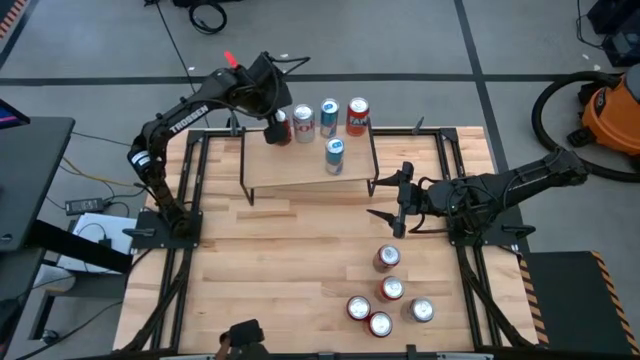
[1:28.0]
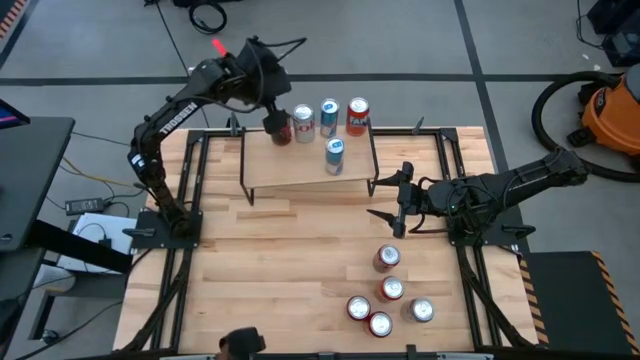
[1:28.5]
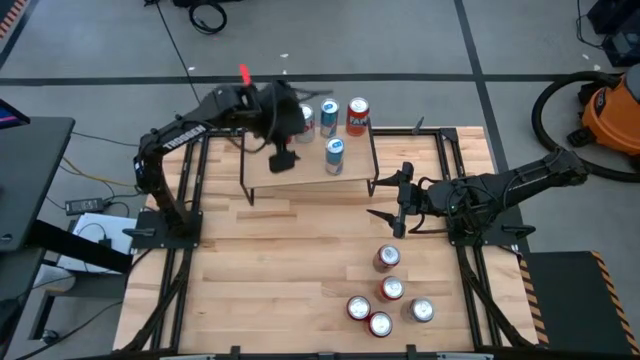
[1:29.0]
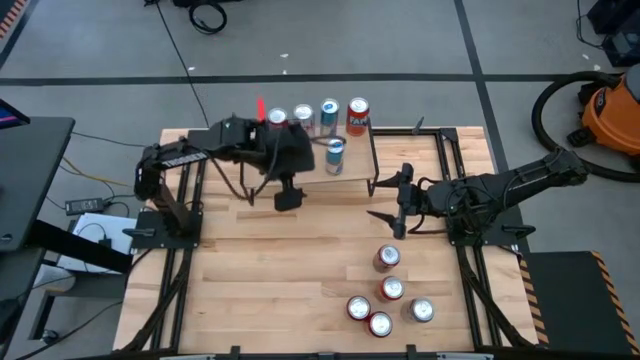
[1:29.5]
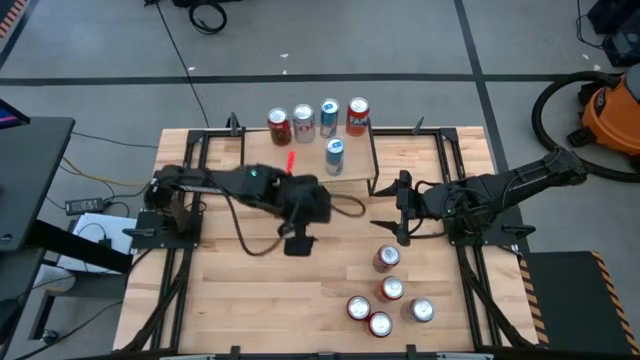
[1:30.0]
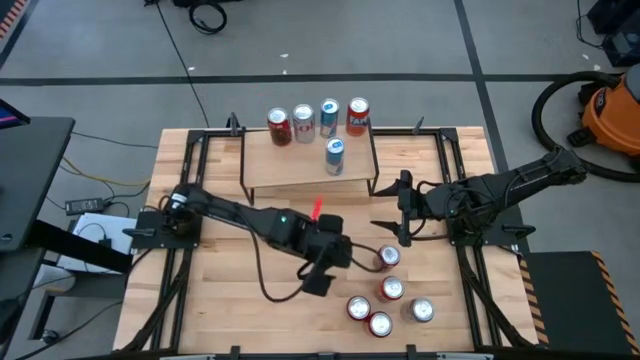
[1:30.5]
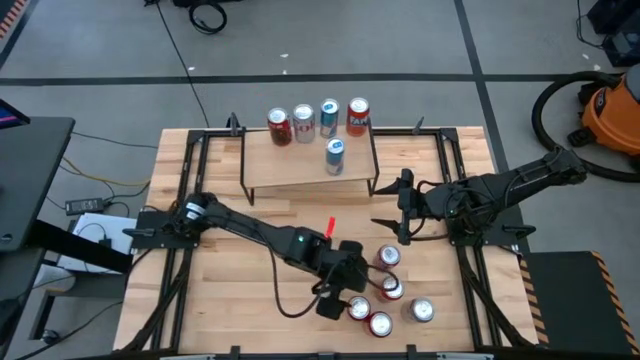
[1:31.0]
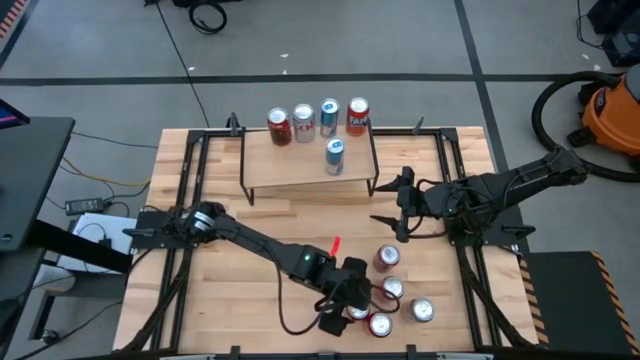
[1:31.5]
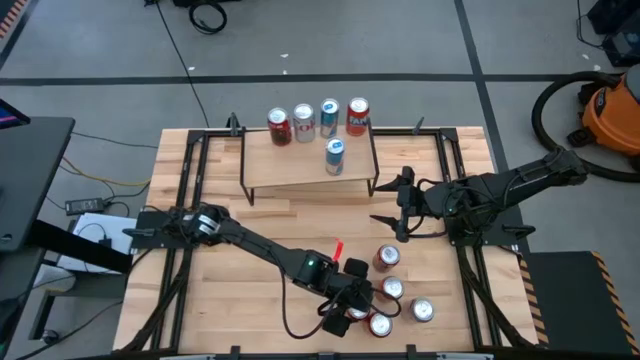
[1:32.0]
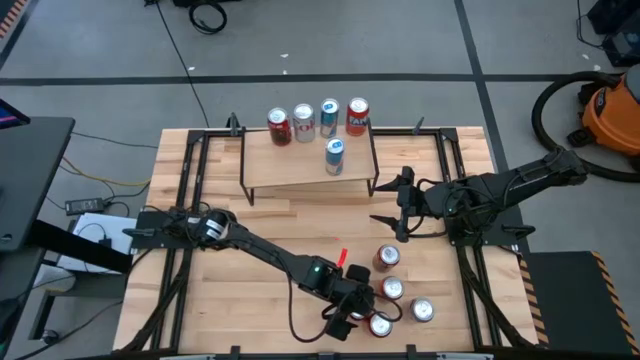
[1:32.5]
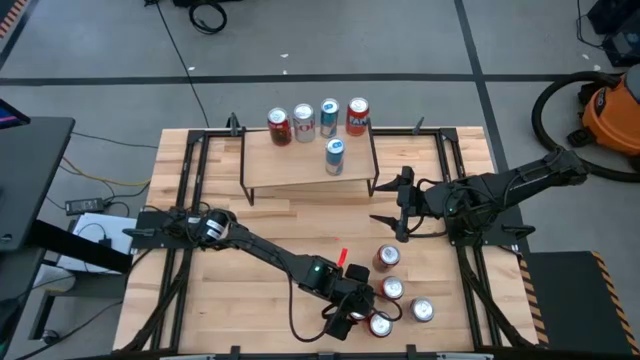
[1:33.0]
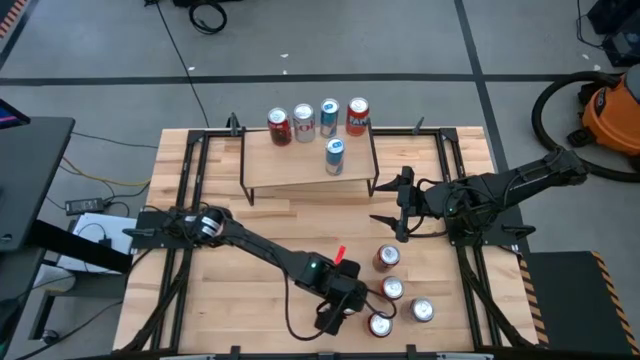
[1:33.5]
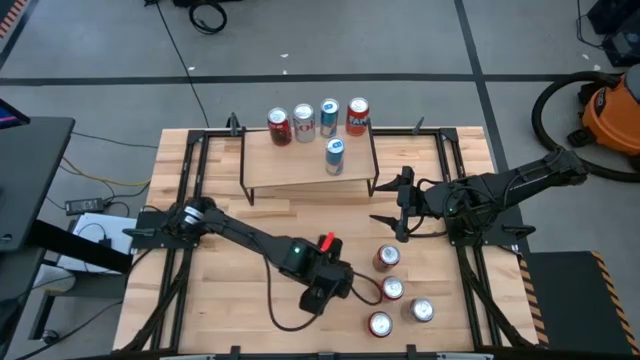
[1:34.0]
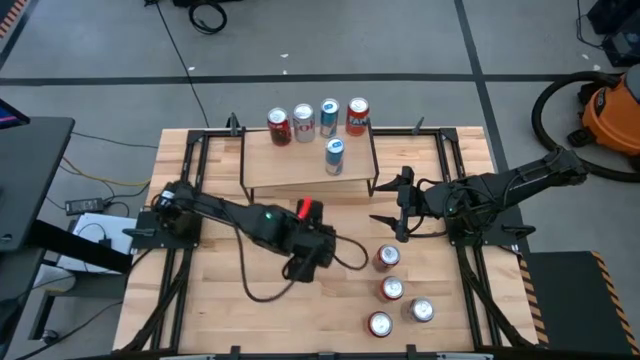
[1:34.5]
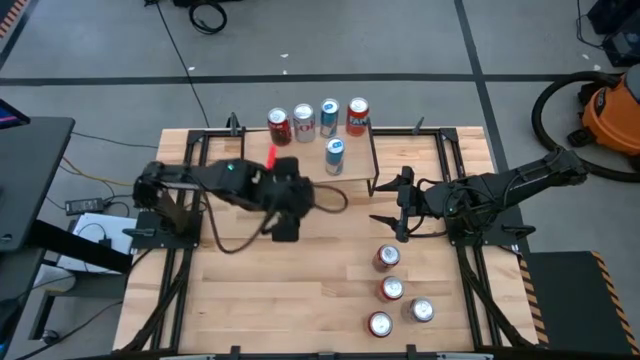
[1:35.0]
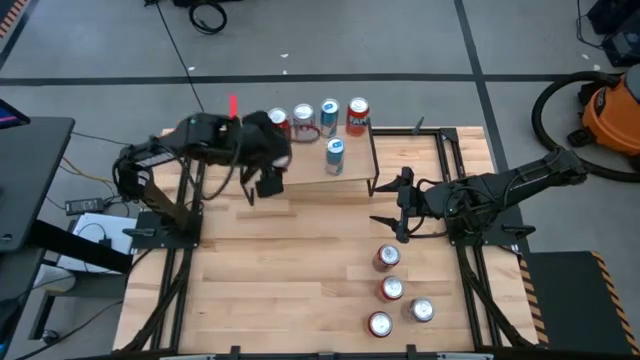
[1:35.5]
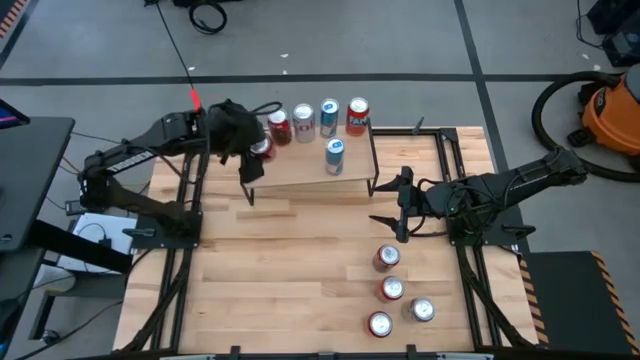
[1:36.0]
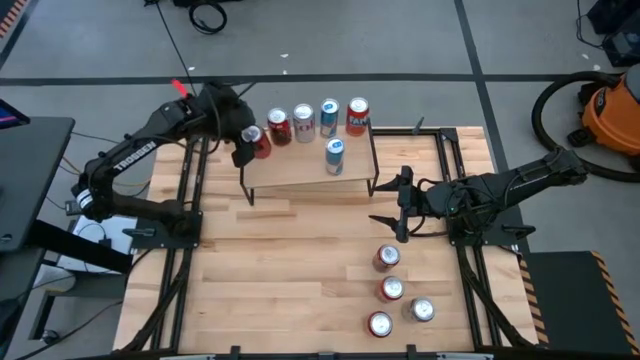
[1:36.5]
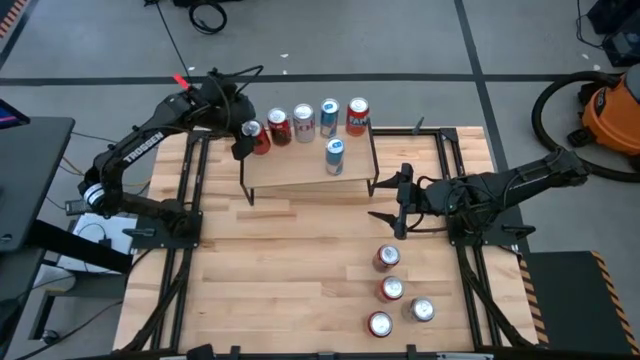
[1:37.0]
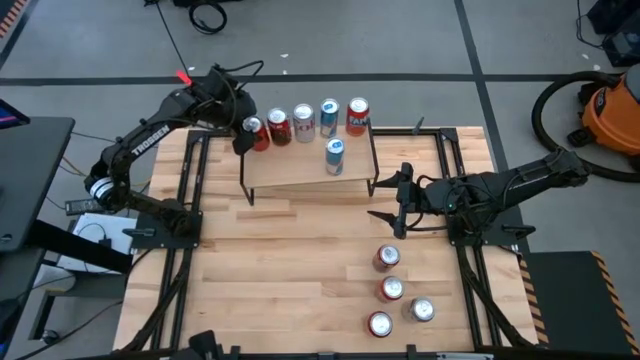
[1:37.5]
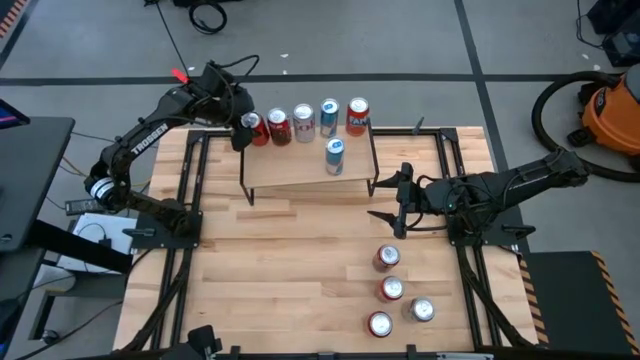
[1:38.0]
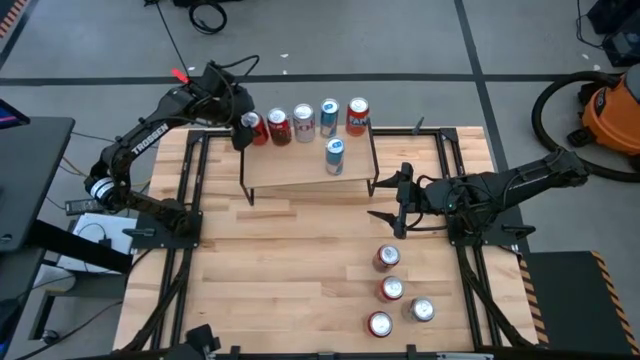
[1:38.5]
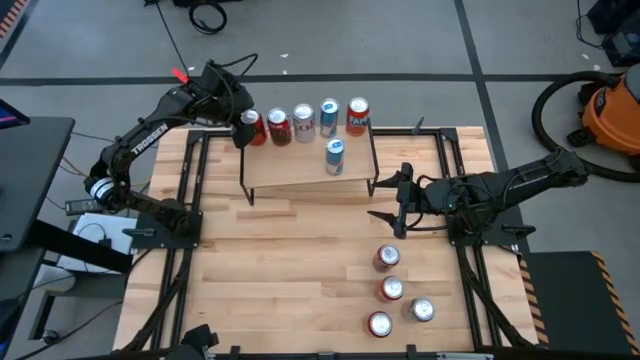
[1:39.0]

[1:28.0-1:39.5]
Task: Place canned beverage on shelf
Put the left black soda can on the shelf

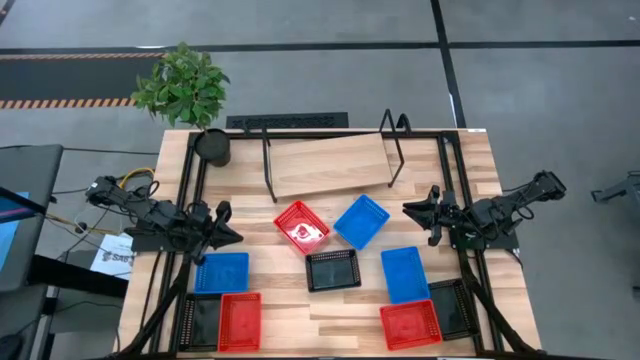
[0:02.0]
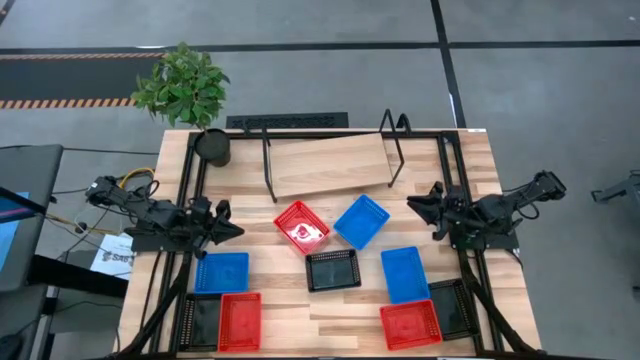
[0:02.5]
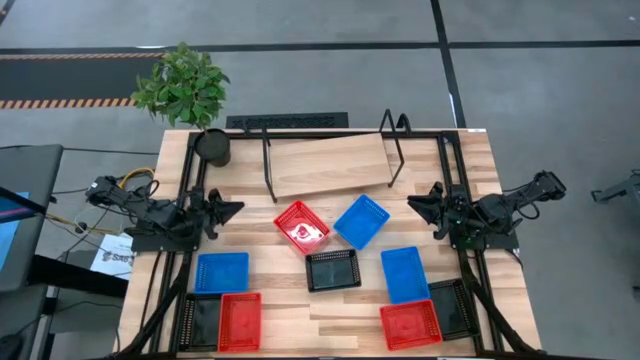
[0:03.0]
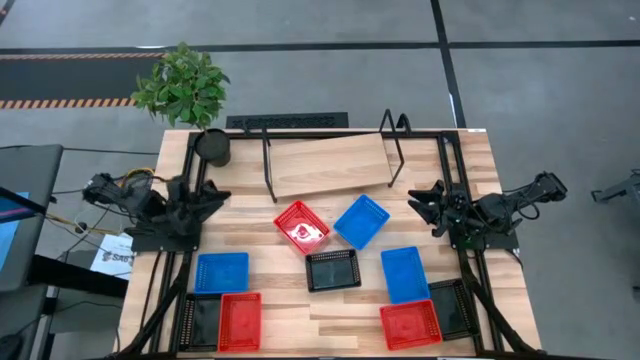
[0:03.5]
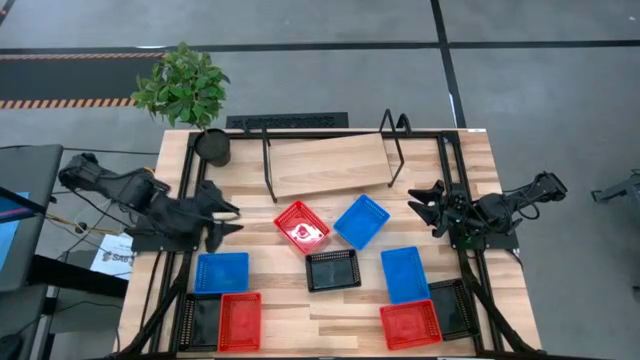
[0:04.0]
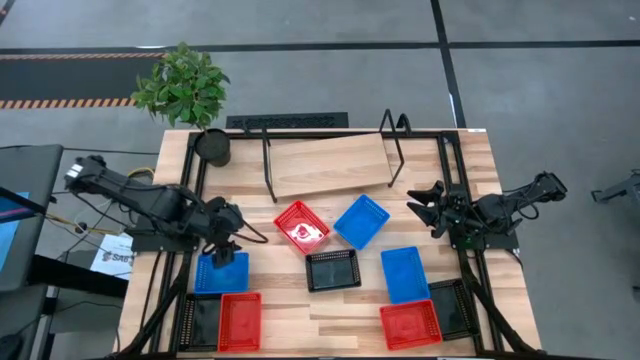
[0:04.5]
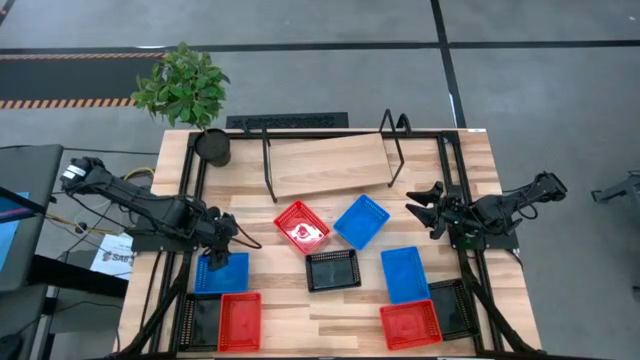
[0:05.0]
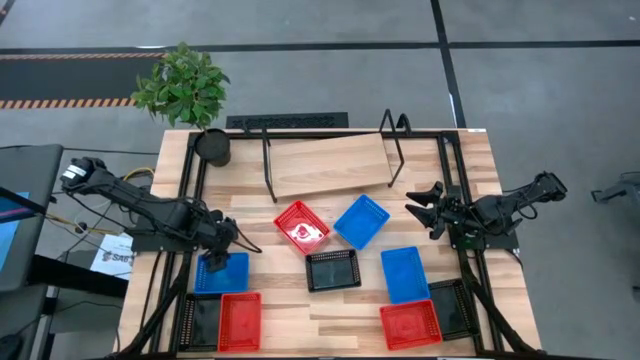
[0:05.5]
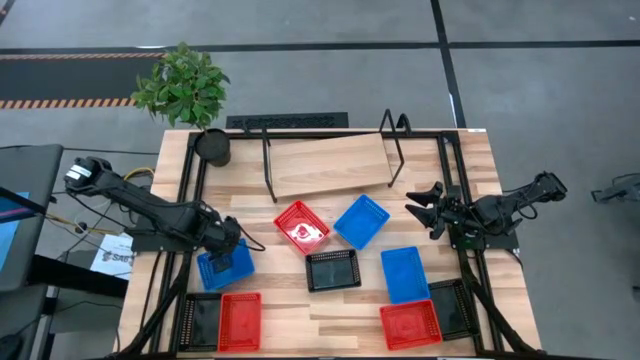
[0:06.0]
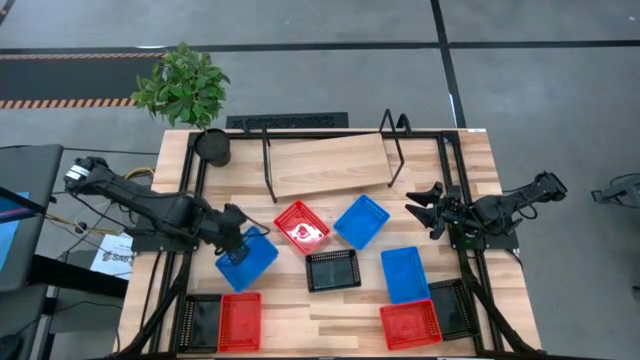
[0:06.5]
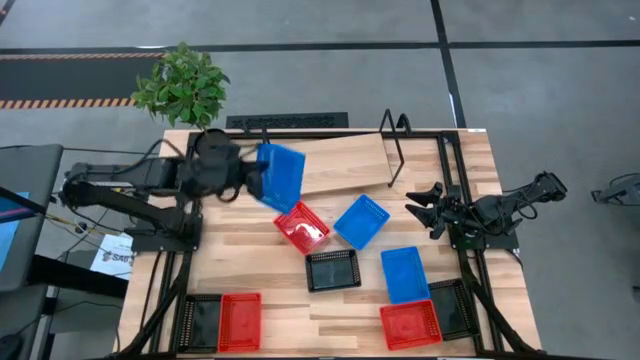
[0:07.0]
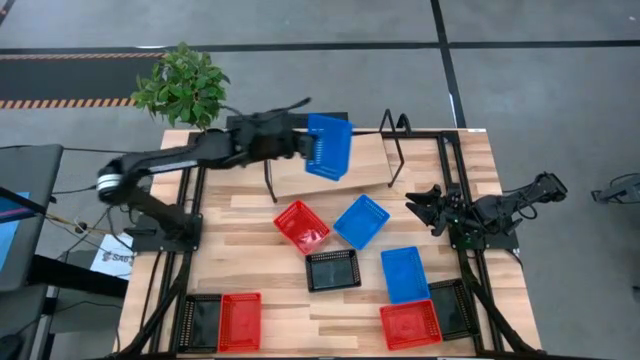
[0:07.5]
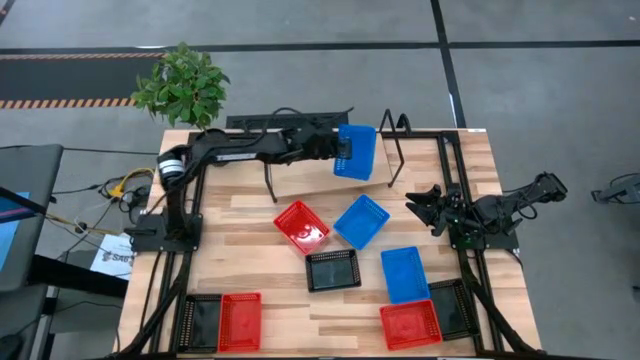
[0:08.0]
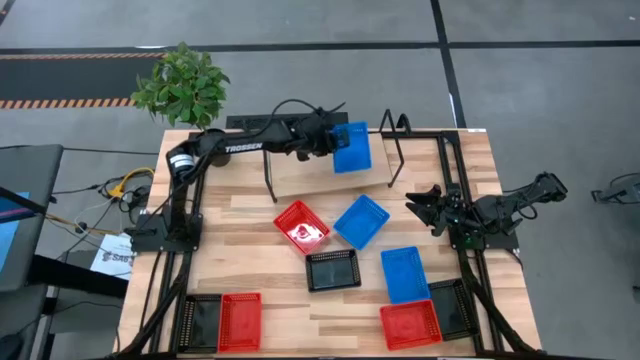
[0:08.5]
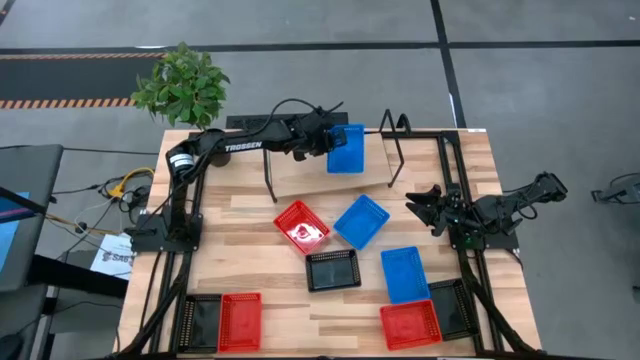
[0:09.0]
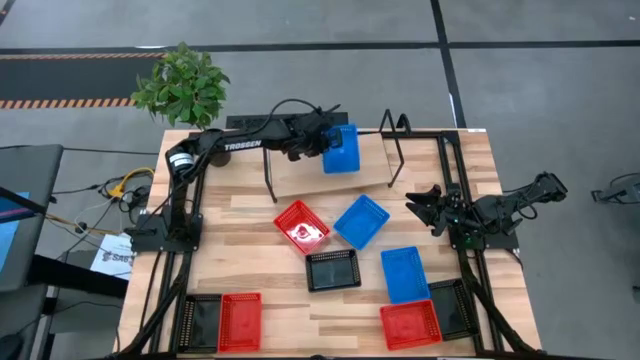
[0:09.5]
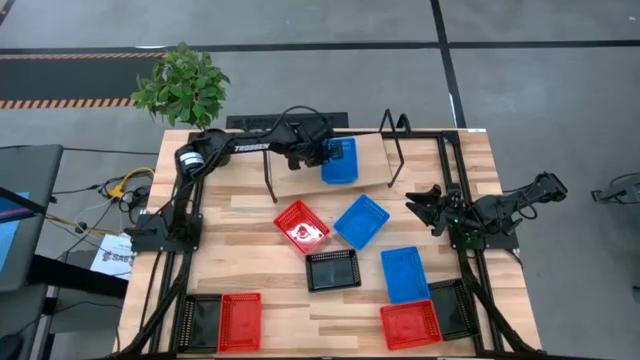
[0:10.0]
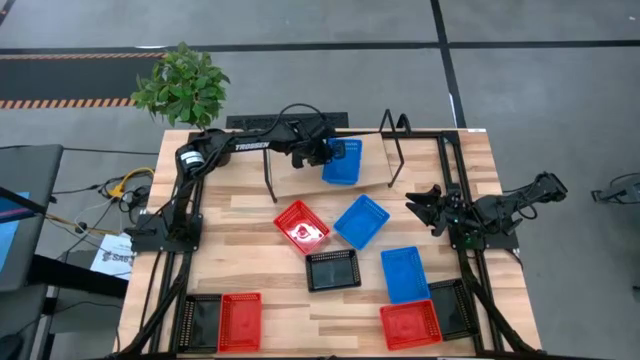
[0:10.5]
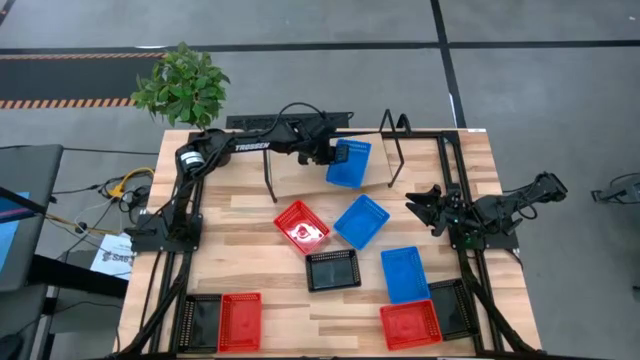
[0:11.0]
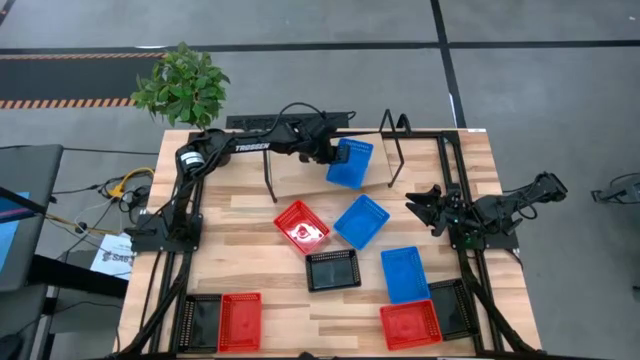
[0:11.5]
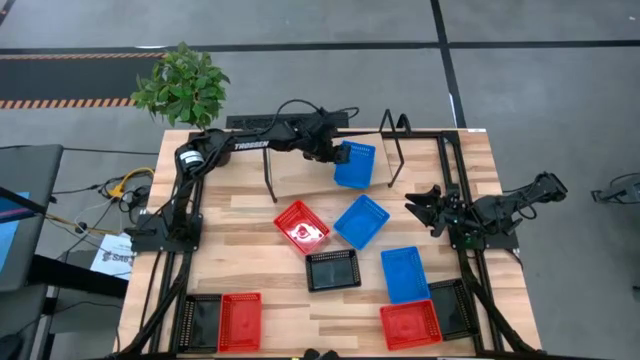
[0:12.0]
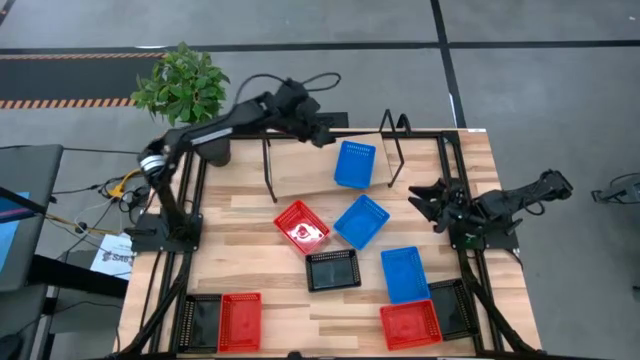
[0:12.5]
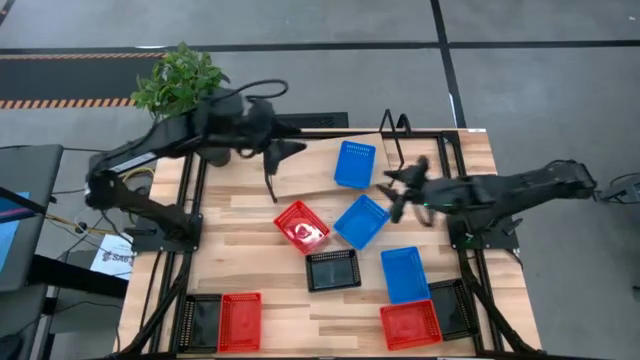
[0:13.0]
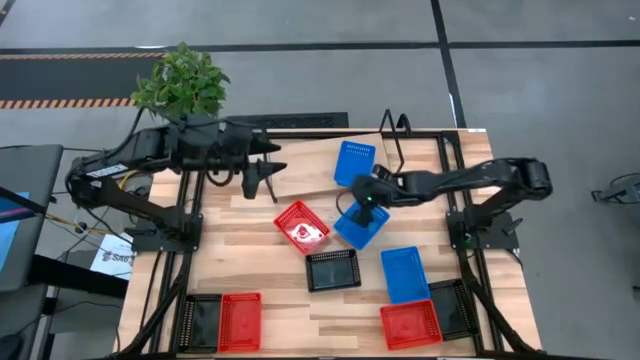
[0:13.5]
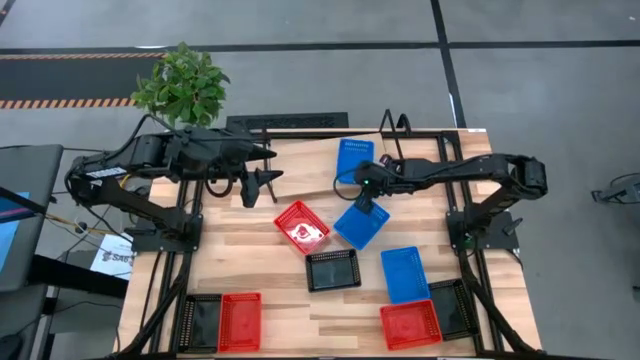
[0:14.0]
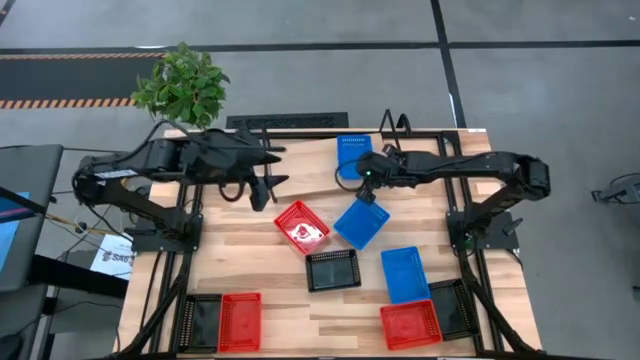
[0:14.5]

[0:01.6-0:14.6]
Task: Stack baskets on shelf by color
Put the bottom left blue bin on the shelf
